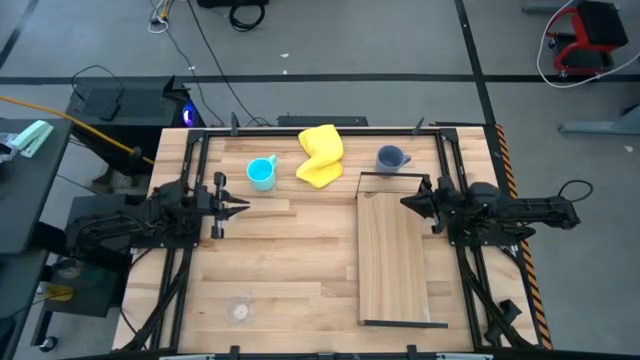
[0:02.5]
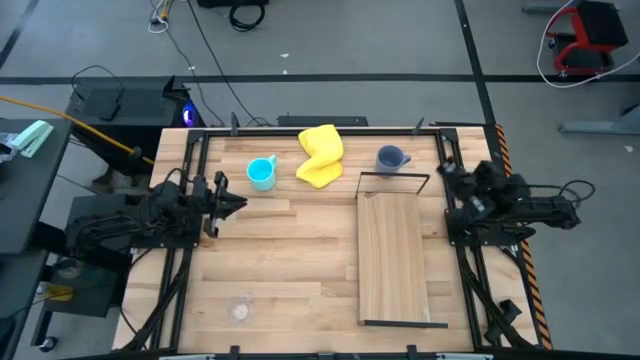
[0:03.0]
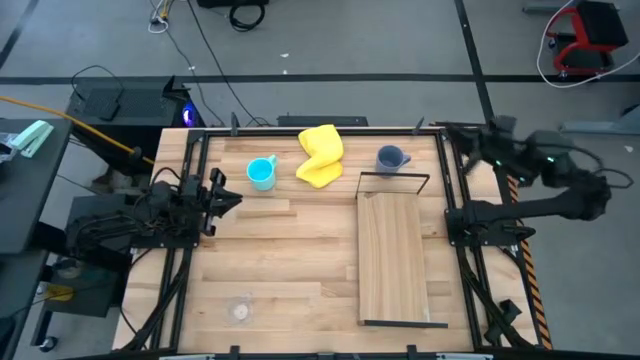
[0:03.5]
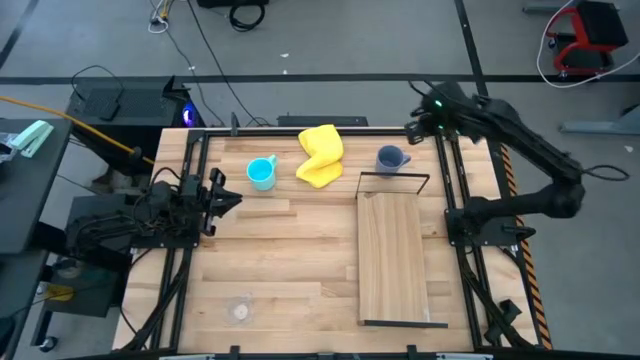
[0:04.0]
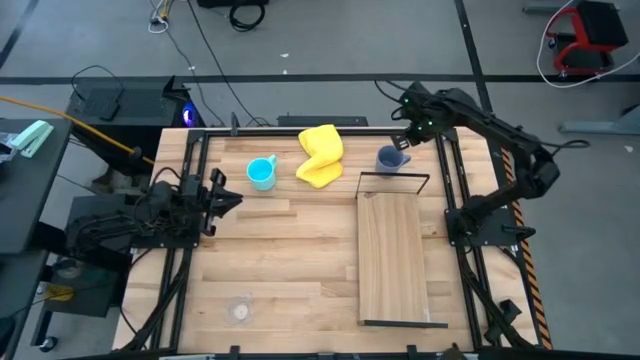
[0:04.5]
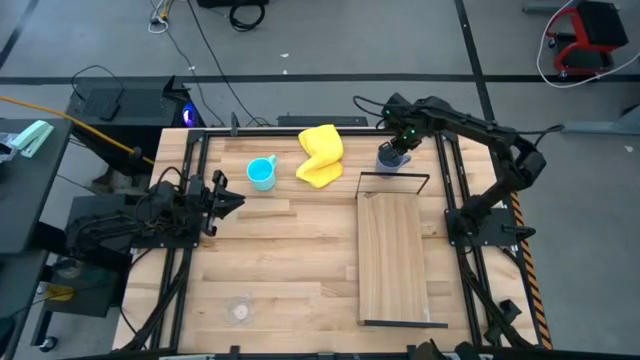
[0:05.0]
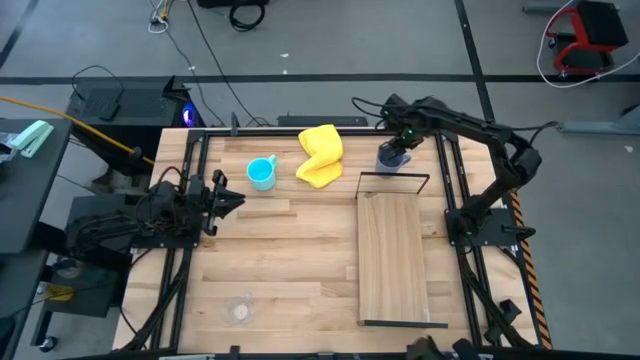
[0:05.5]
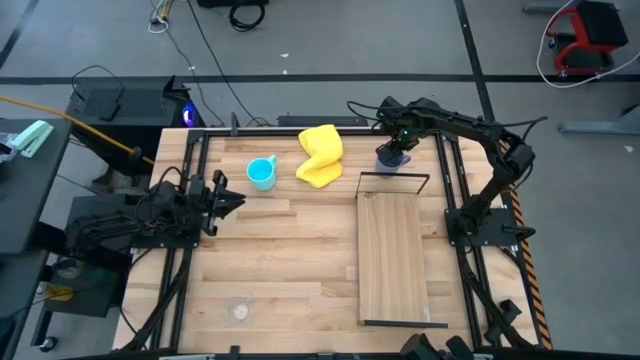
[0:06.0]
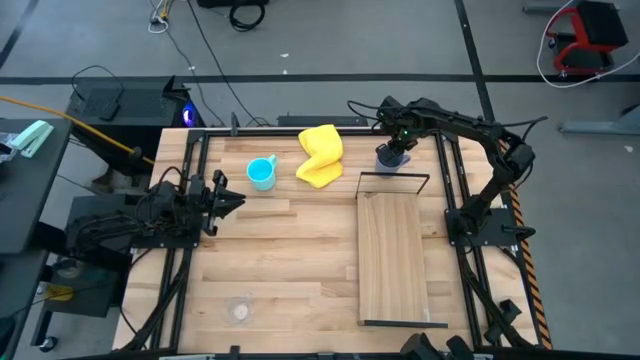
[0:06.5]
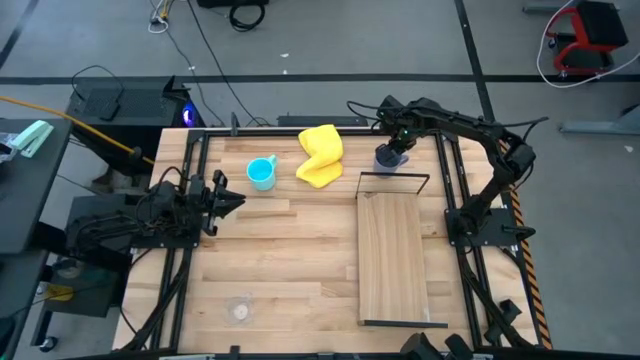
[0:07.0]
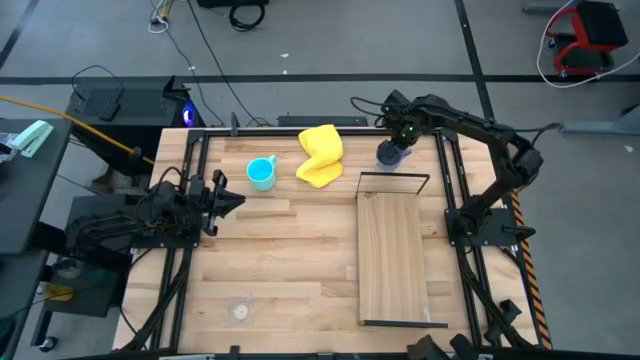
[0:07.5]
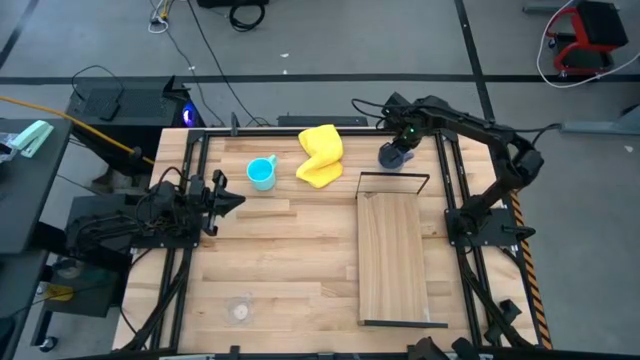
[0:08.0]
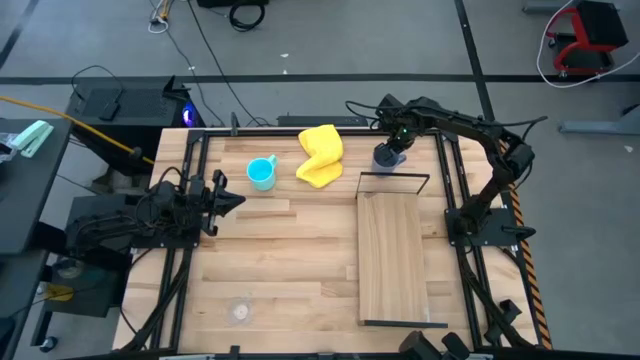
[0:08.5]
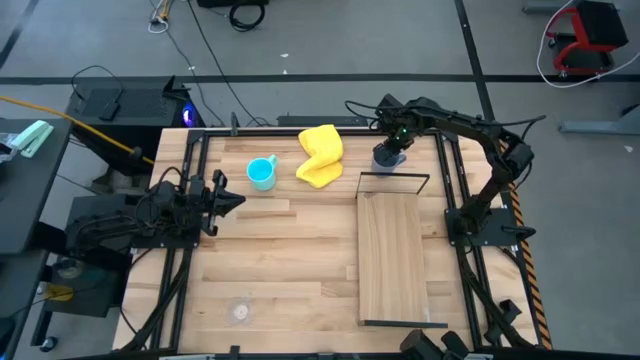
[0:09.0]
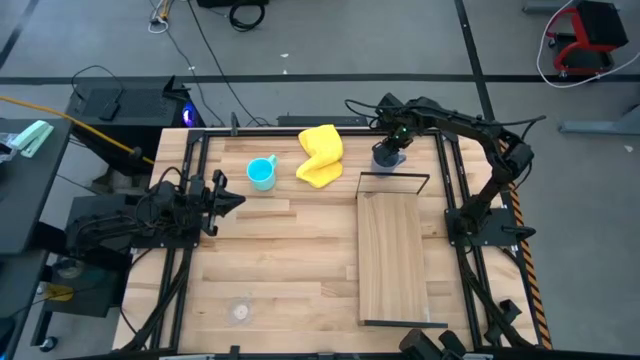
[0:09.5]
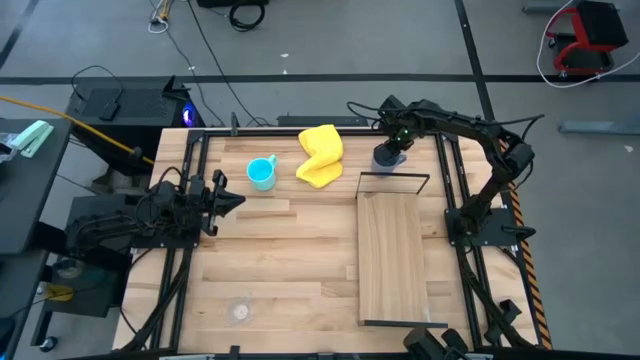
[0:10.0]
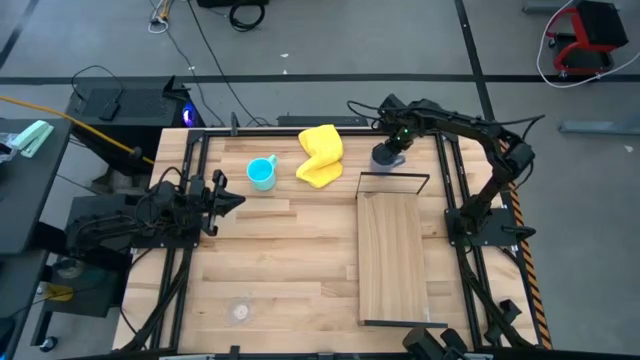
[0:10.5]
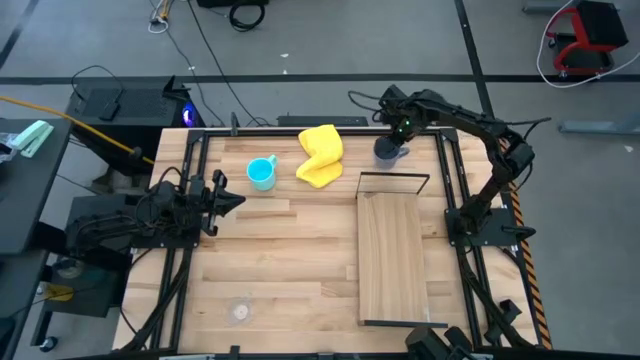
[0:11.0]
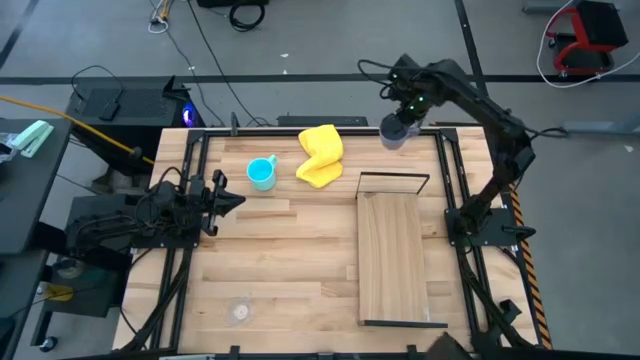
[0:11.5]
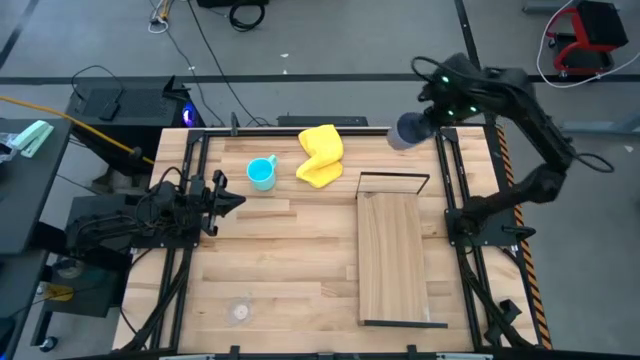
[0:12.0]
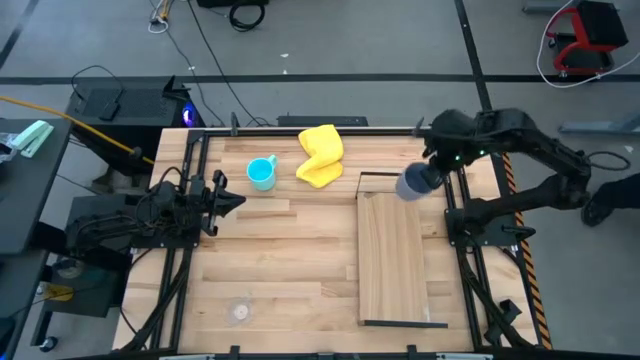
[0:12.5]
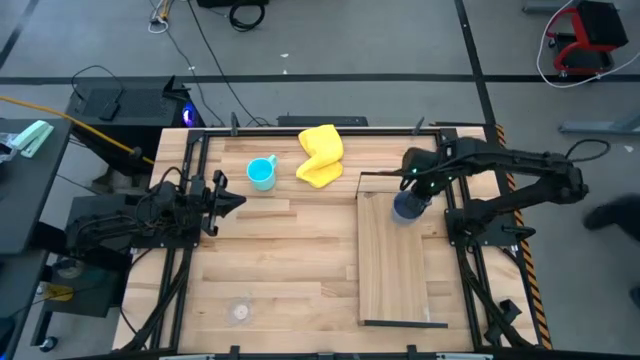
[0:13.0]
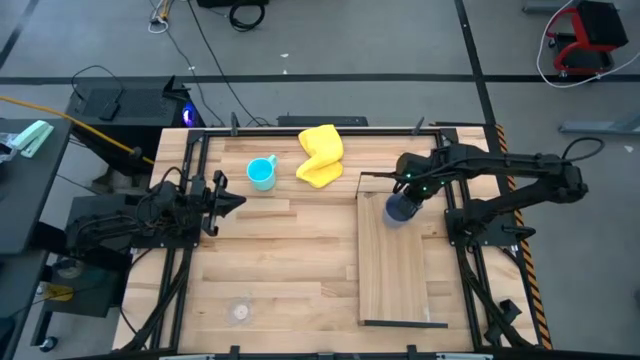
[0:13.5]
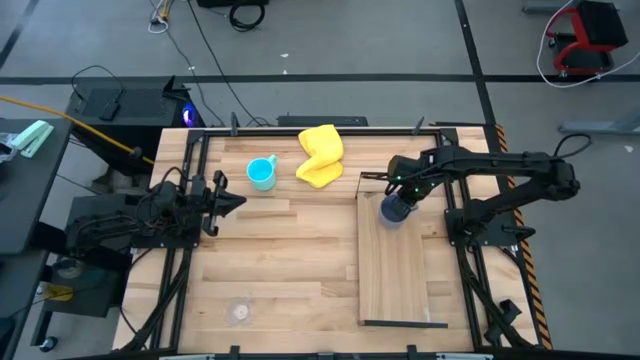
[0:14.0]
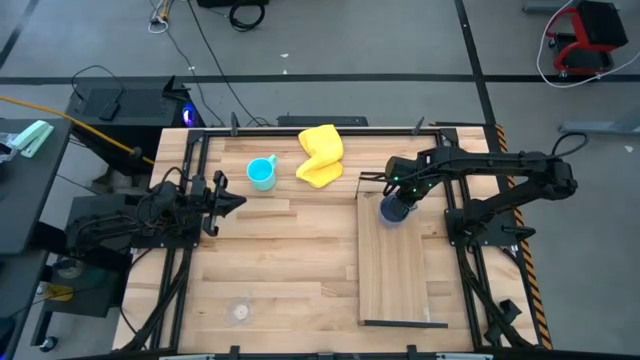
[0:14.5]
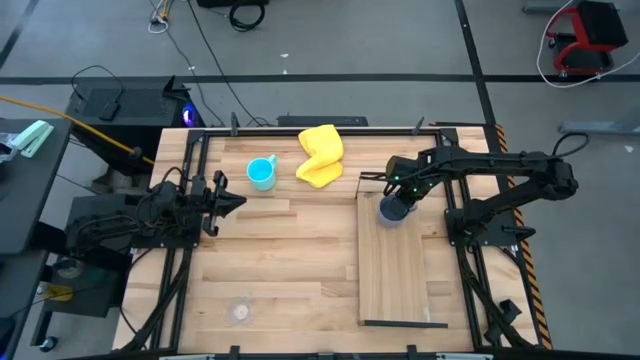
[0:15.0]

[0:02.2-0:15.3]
Task: Stack small to large cups/mugs on shelf
Put the violet mug on the shelf

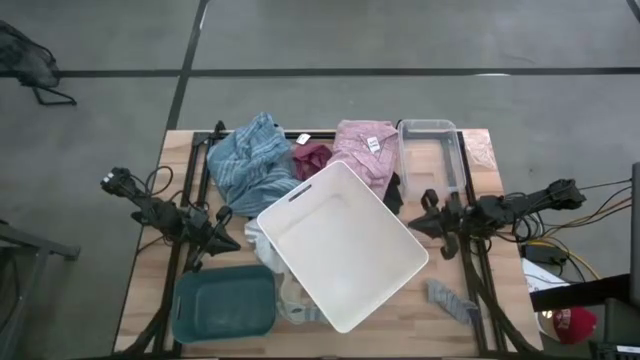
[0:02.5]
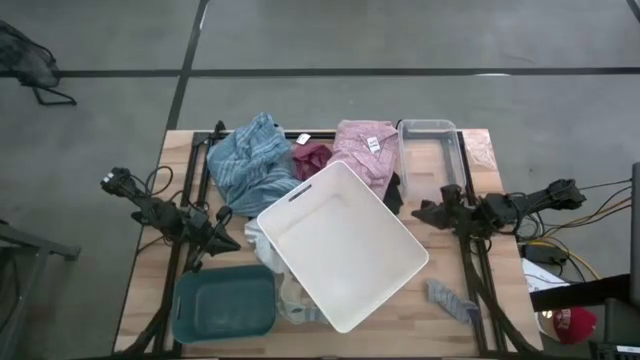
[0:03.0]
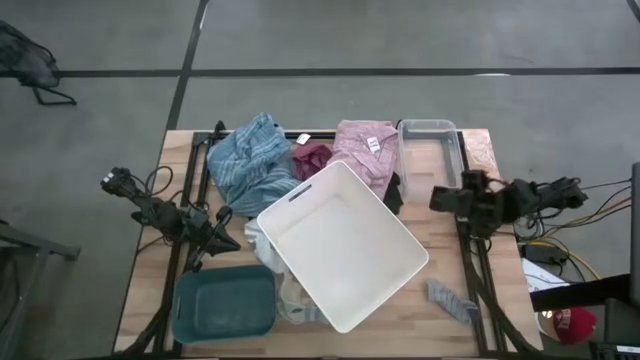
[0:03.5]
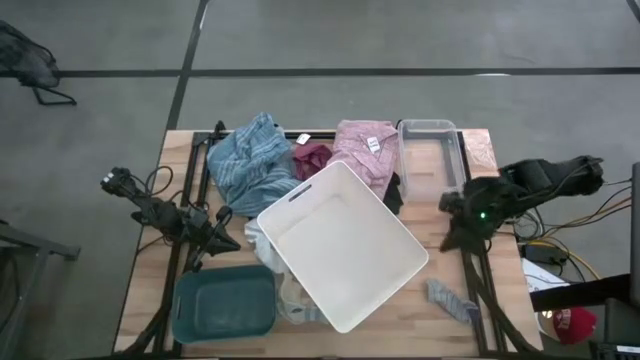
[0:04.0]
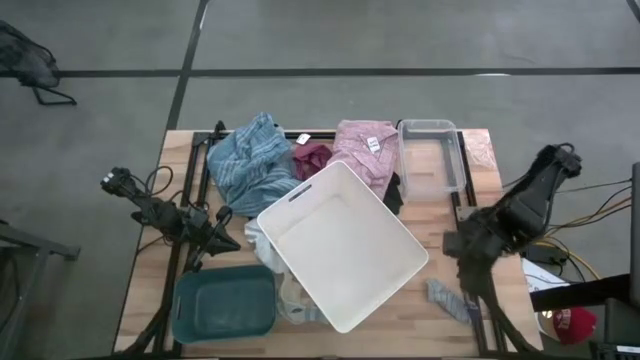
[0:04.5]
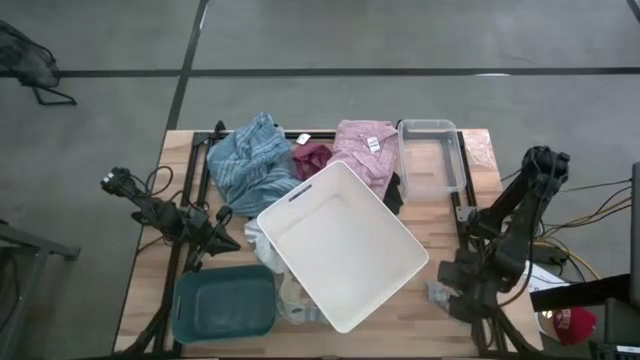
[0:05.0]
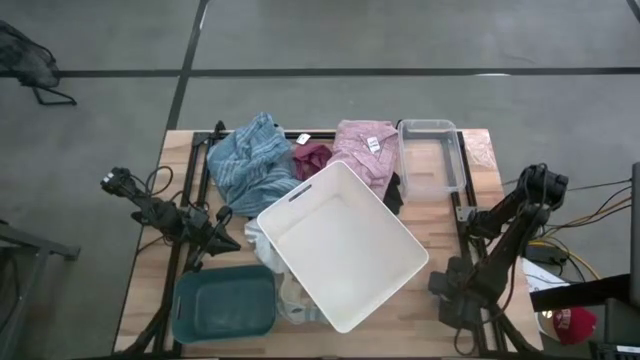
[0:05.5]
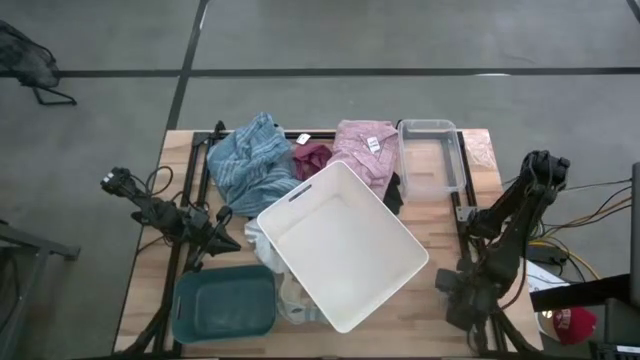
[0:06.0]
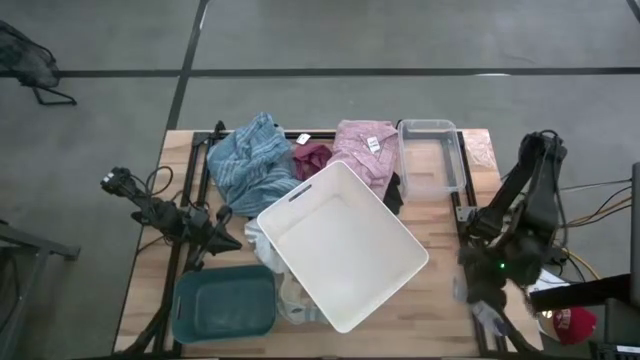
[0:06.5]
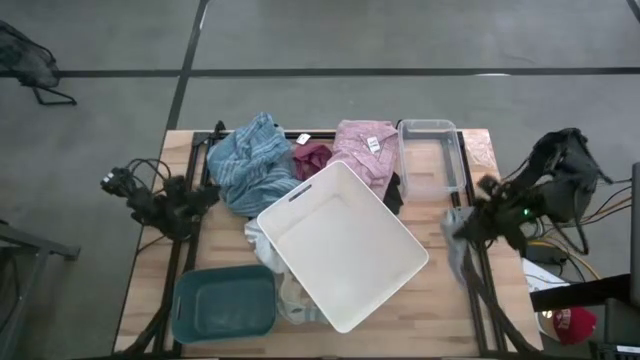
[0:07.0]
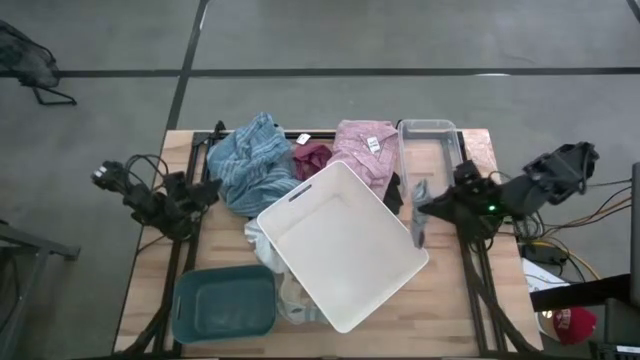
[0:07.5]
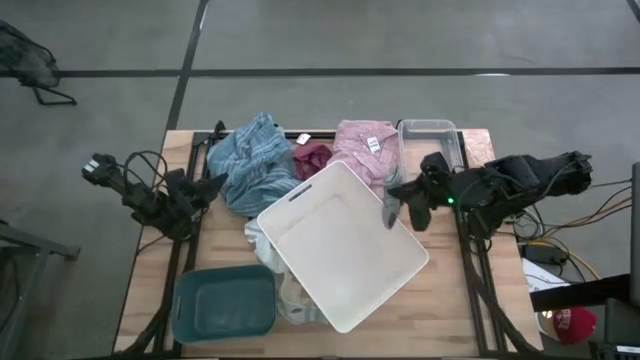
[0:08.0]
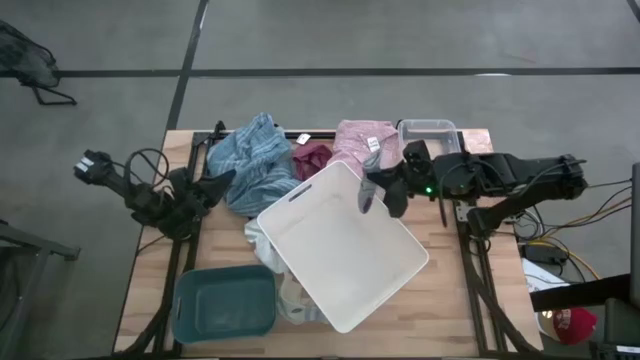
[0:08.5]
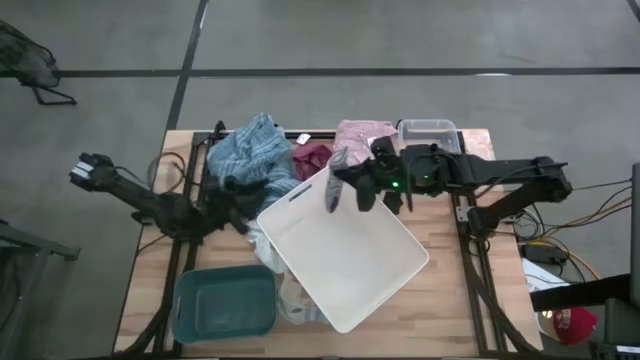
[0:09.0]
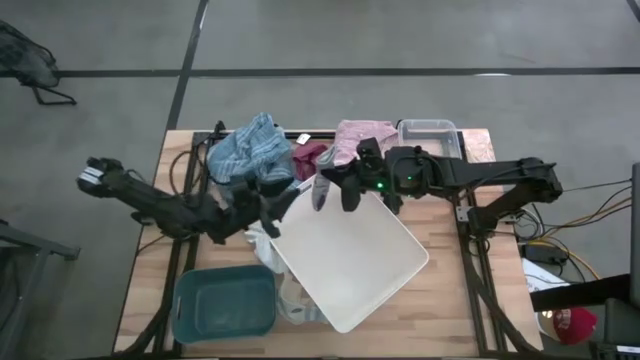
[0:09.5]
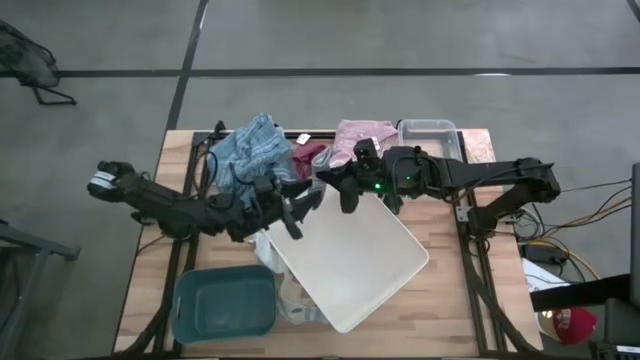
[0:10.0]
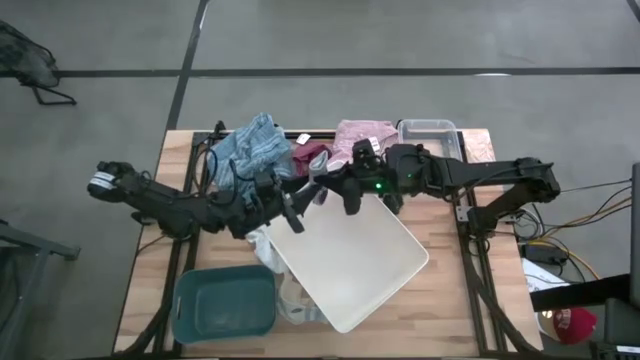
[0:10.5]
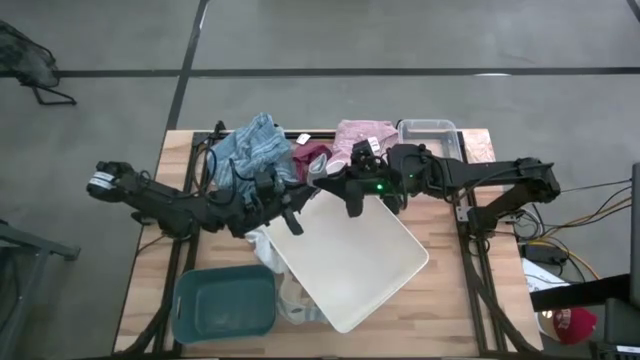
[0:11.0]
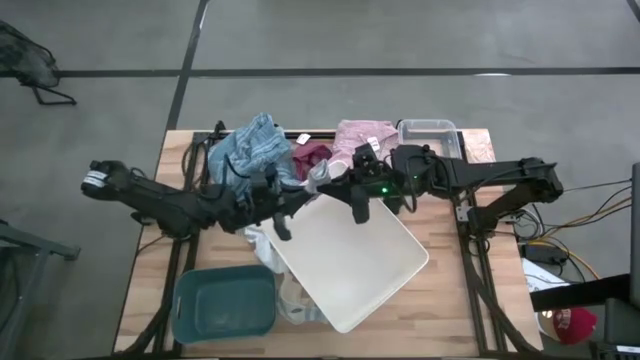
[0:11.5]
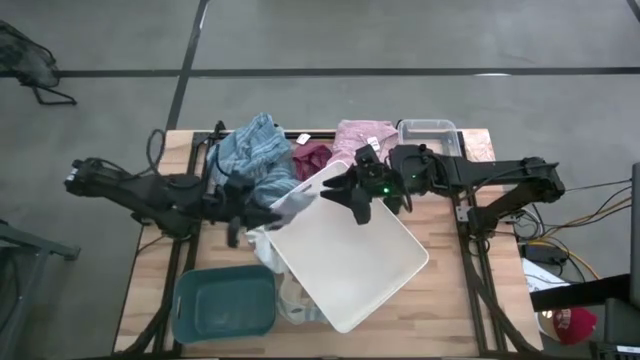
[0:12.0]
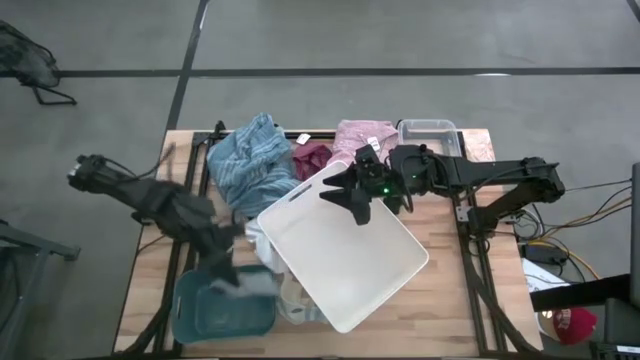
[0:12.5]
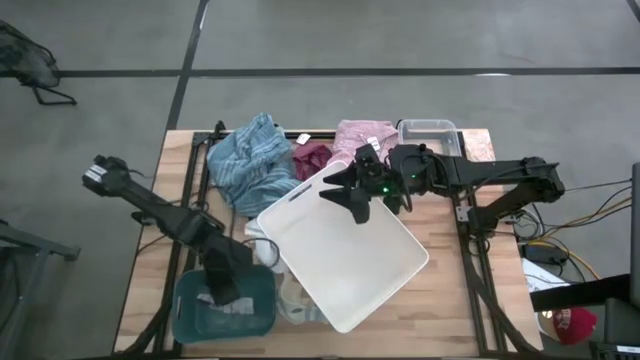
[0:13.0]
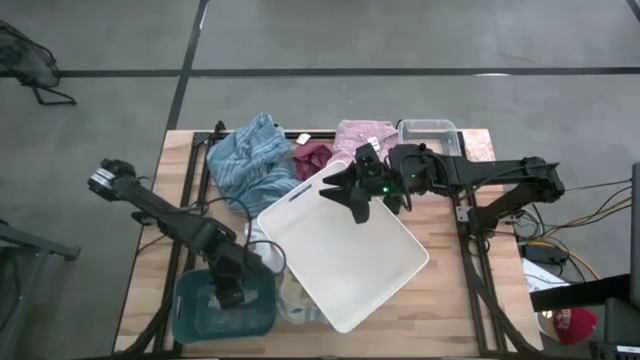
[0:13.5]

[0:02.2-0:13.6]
Task: Pick & Place Cloths
Put the gray sock into the green bin
